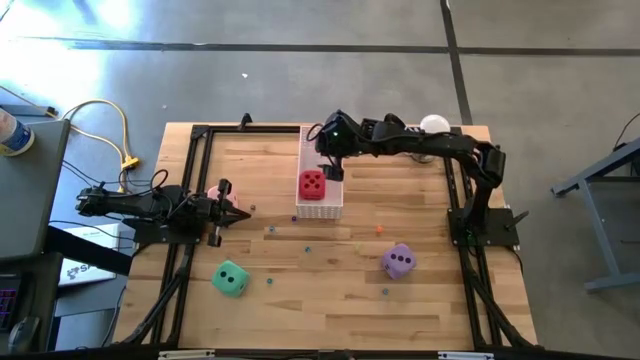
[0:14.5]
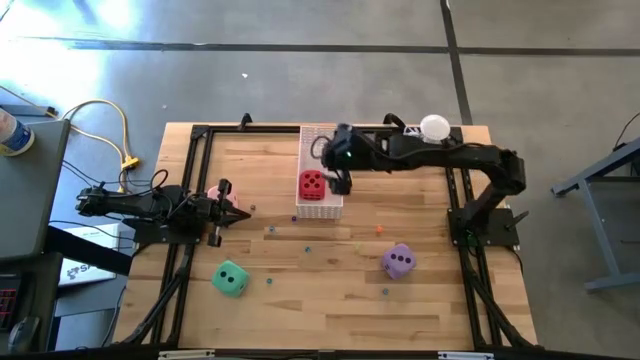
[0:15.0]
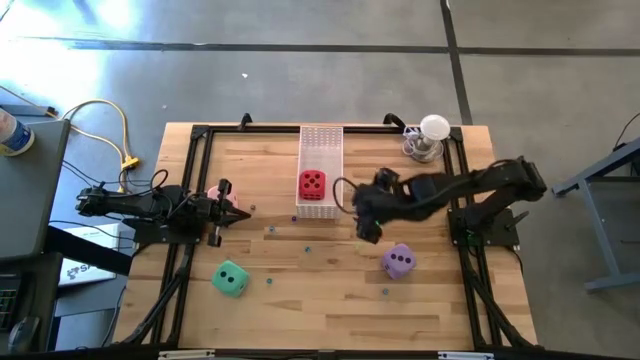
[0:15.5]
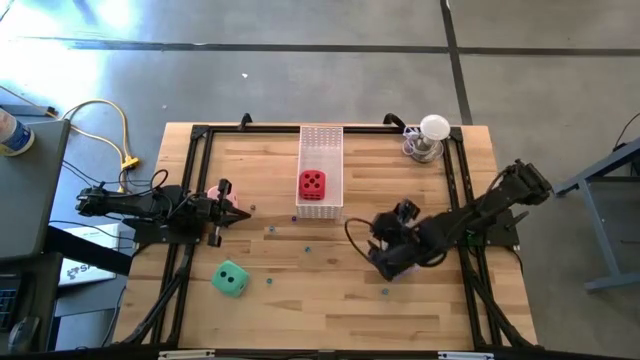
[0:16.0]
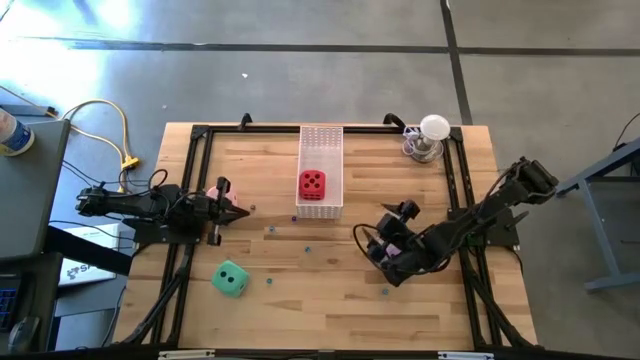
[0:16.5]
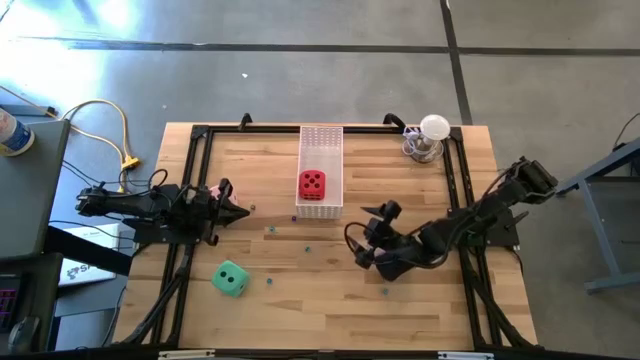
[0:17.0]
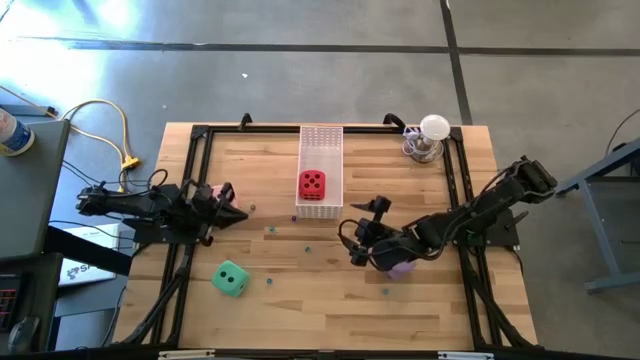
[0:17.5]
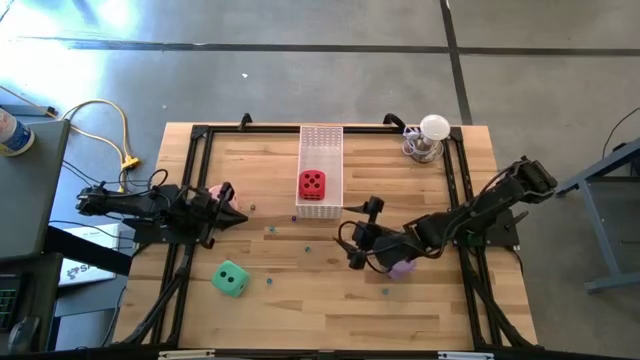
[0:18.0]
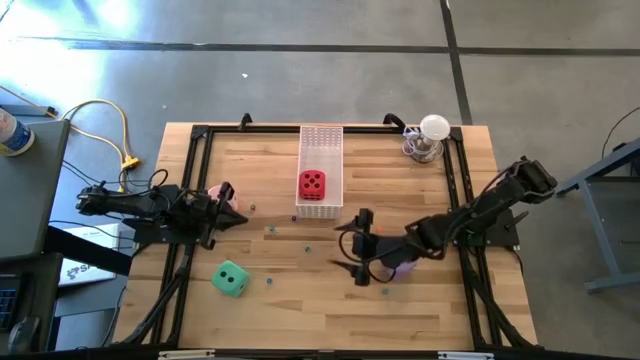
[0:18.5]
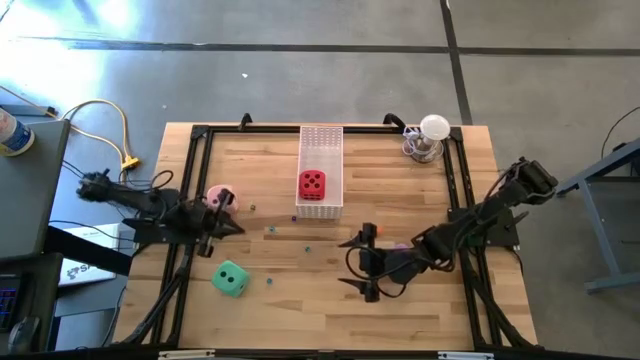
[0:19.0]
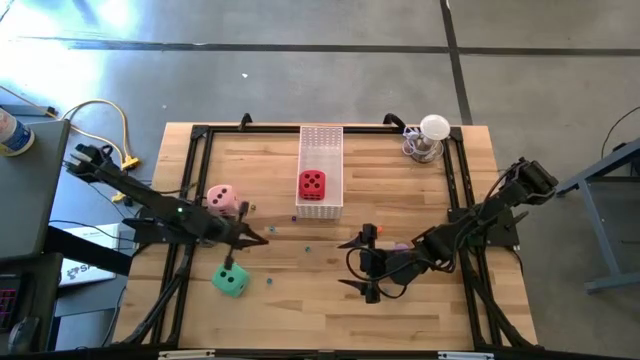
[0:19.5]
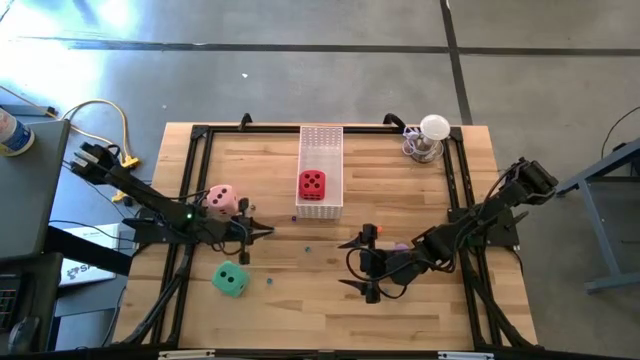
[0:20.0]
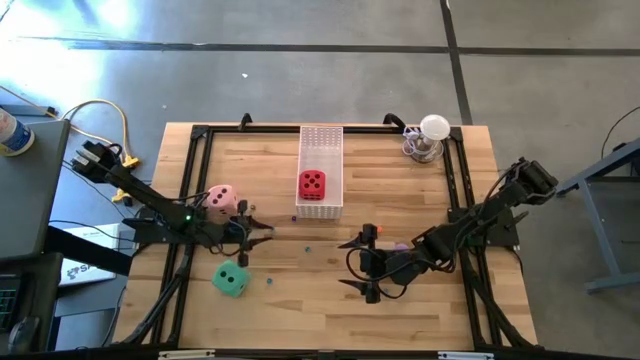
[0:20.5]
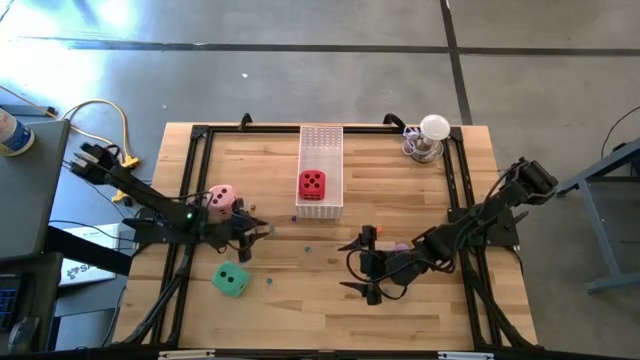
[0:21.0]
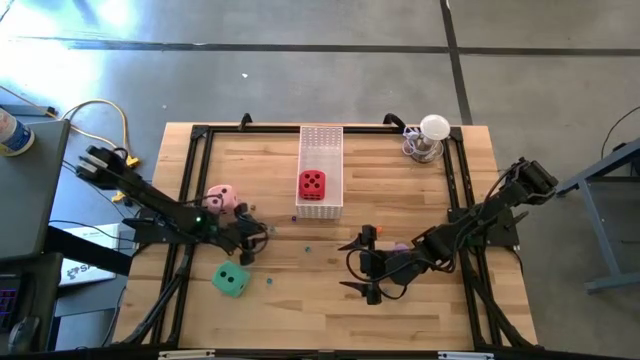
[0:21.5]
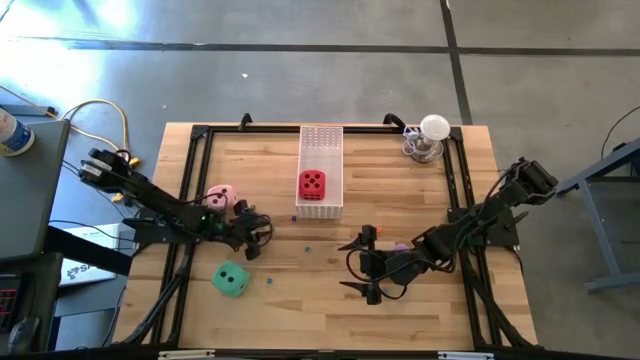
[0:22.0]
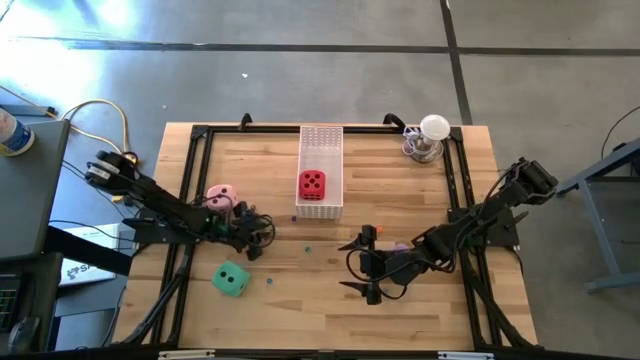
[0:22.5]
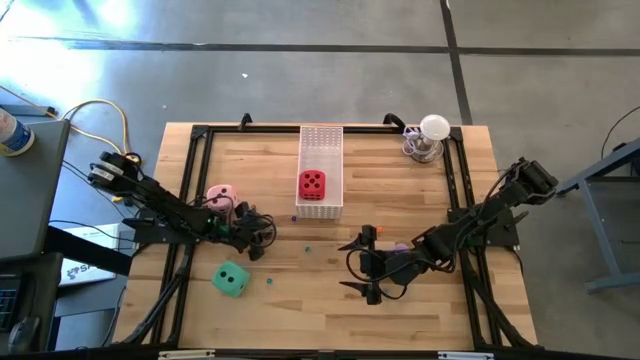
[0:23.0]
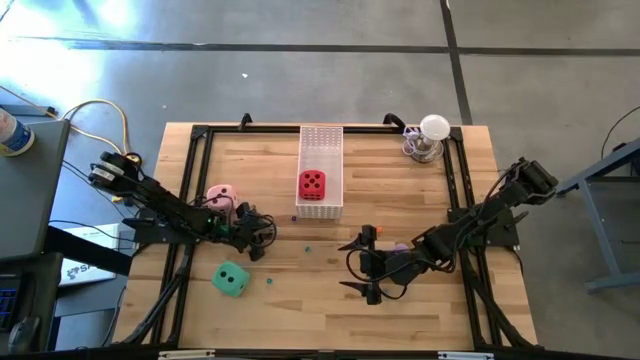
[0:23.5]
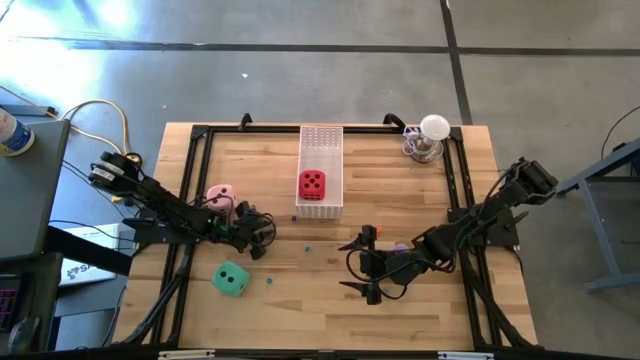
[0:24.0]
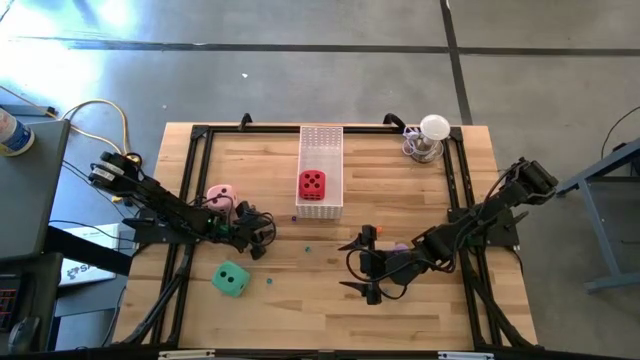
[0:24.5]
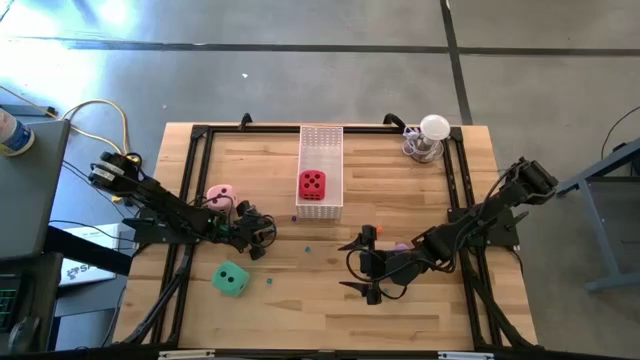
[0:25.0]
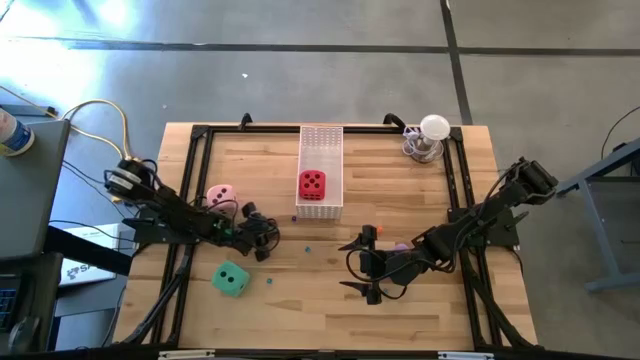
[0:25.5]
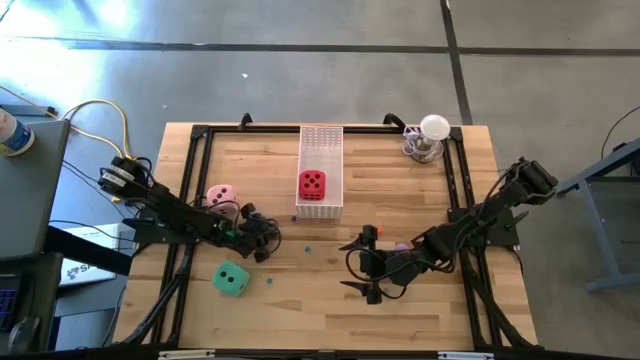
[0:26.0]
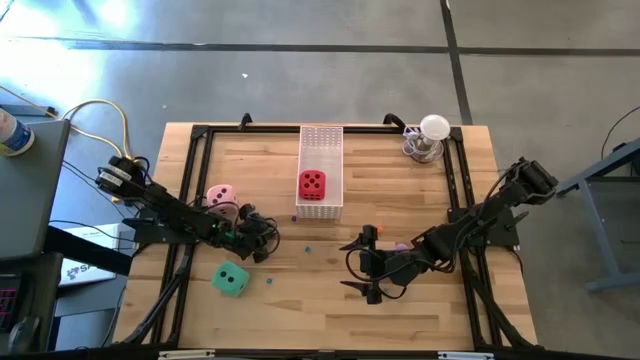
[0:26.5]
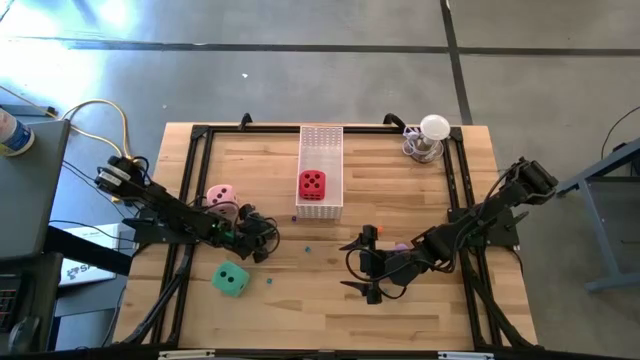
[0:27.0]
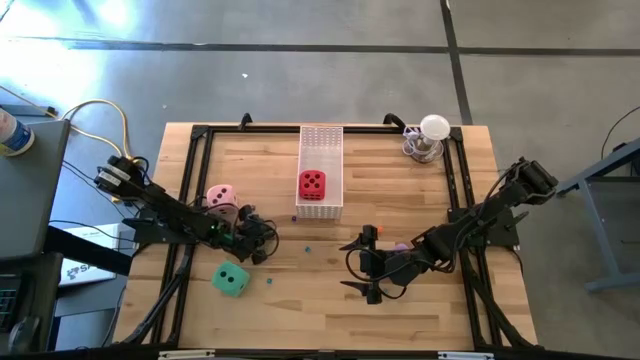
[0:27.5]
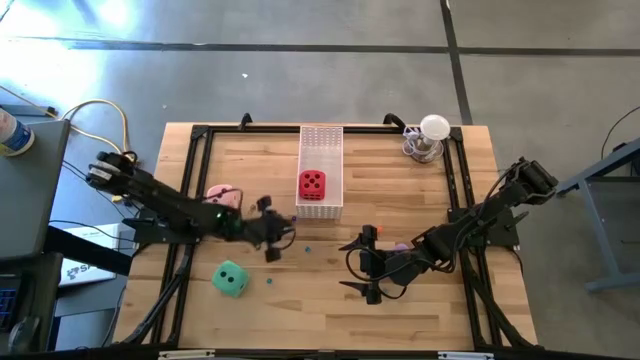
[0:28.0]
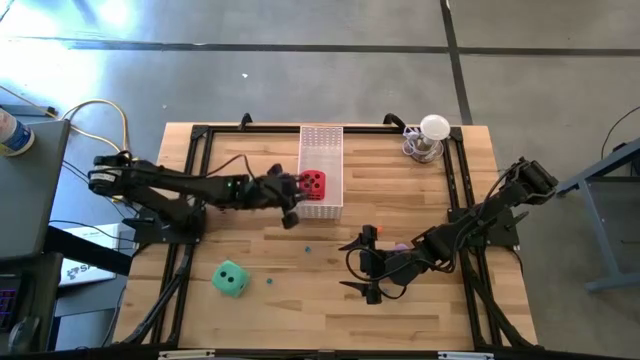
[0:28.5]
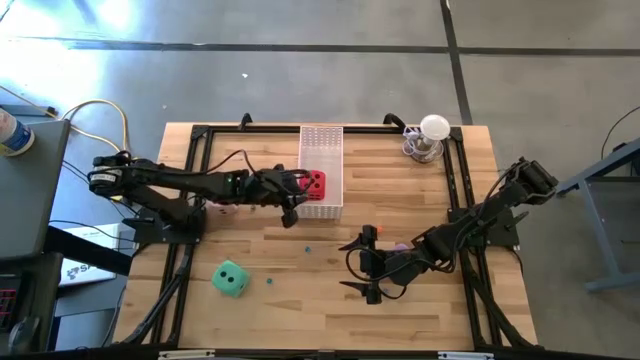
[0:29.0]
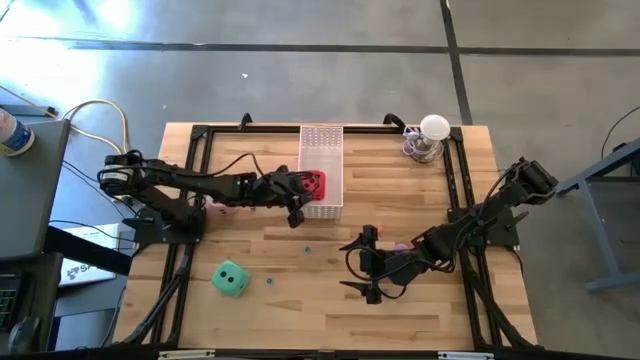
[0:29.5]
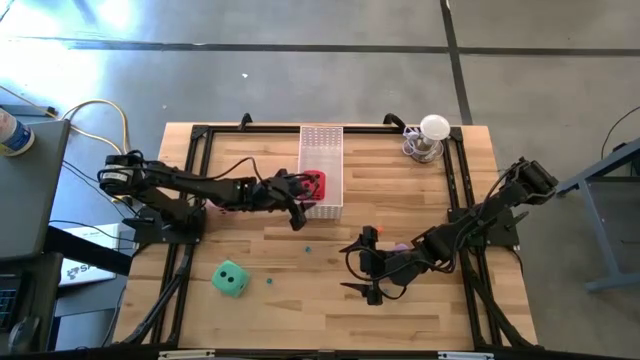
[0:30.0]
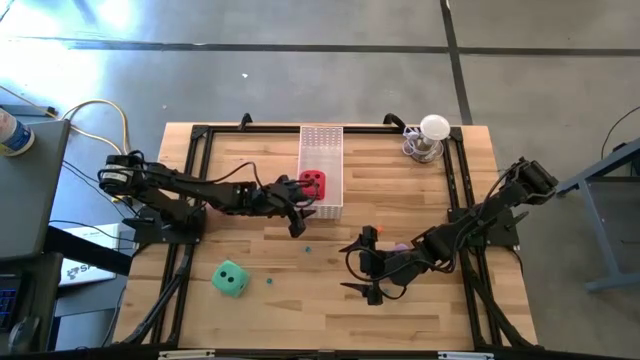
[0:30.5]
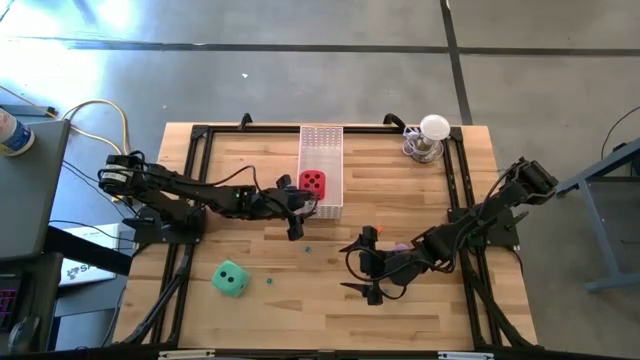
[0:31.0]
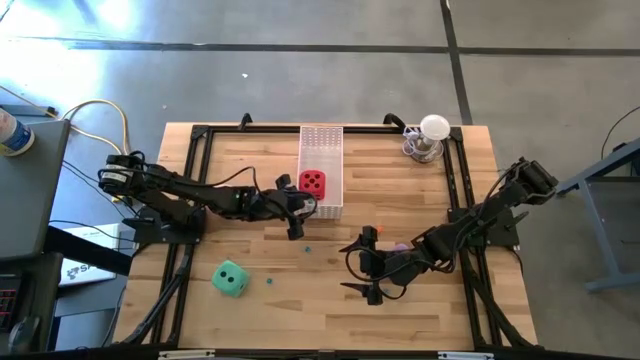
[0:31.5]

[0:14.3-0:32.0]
Task: Pick & Place Dice
Put the small light blue die into the bin

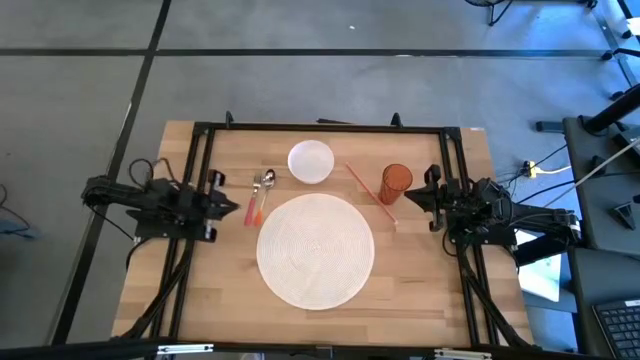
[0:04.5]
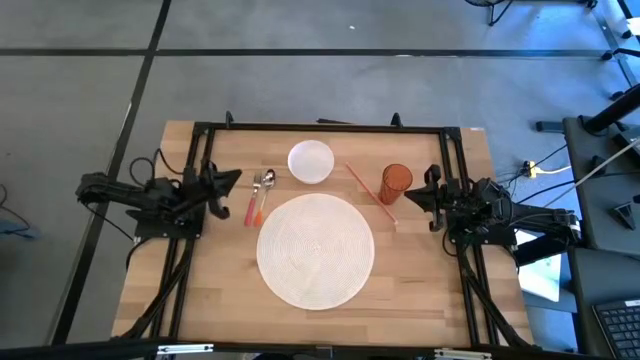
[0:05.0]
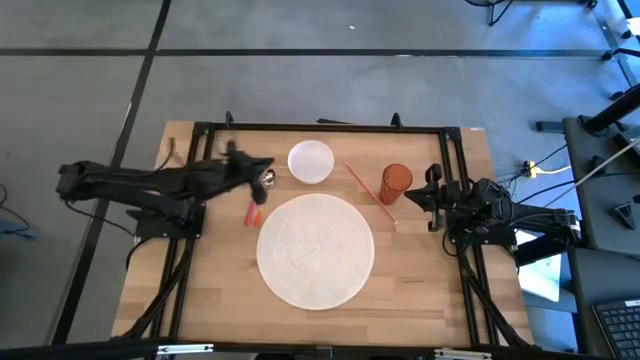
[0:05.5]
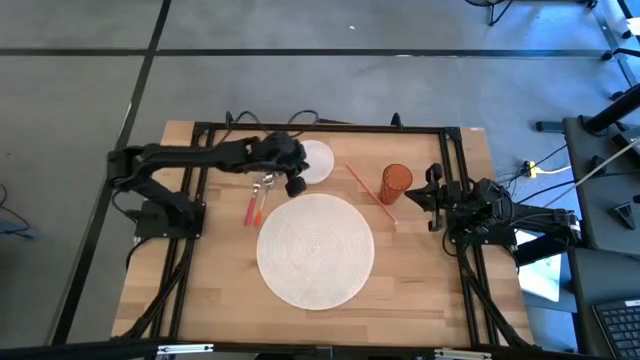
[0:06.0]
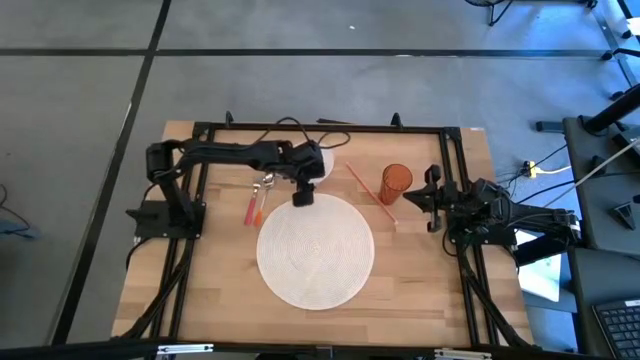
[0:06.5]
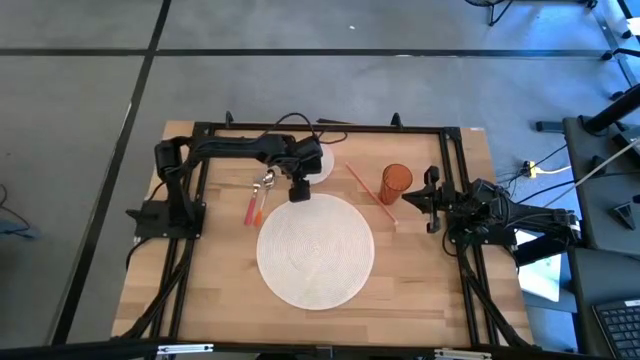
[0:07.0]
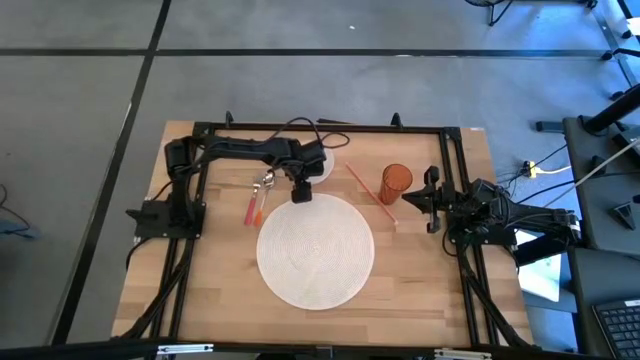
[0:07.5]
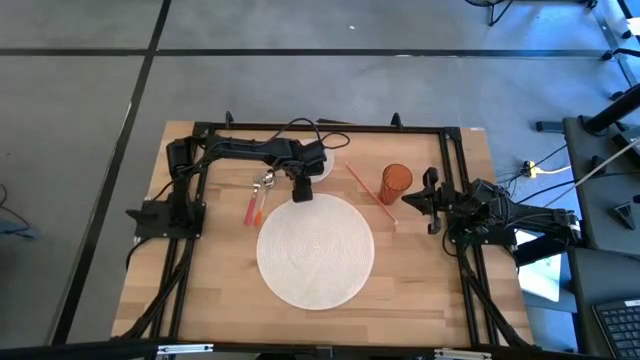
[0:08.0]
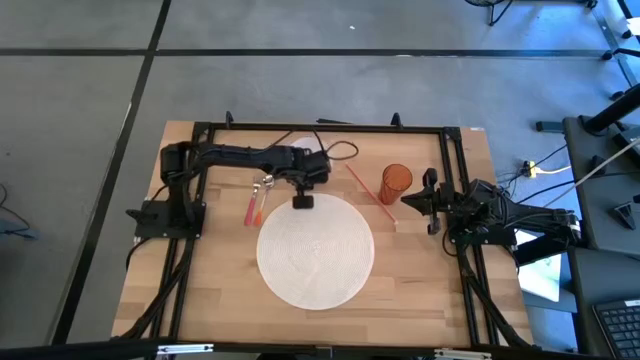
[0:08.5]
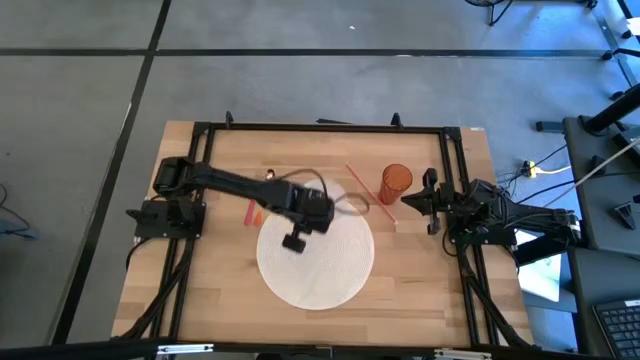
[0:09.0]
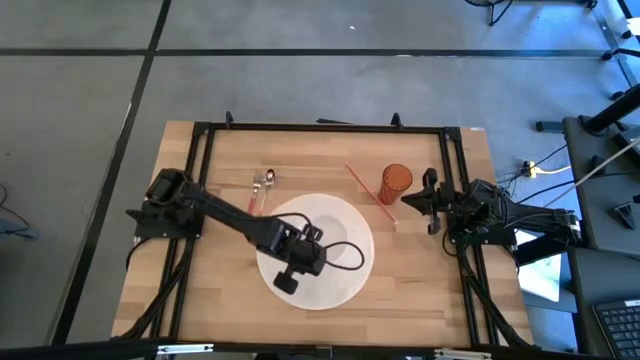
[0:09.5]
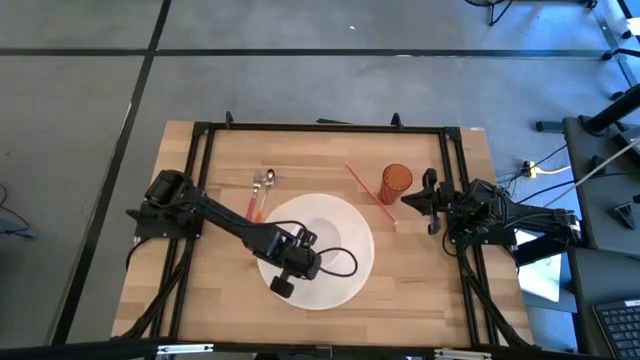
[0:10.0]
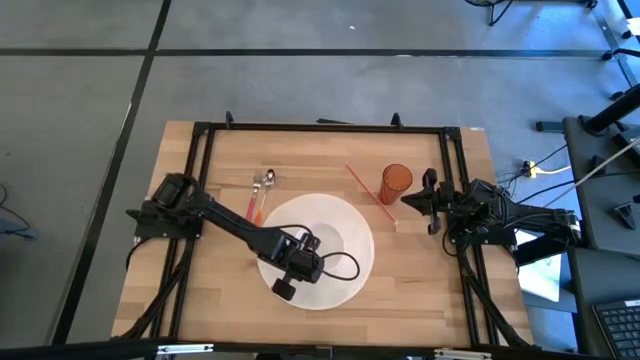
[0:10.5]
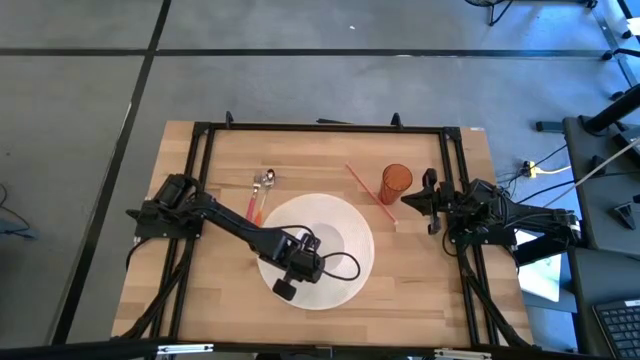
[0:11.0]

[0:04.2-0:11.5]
Task: Pick & Place Utensil
Put the white bowl on top of the white mat
